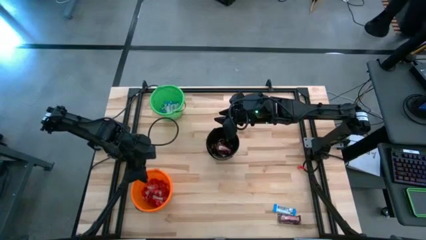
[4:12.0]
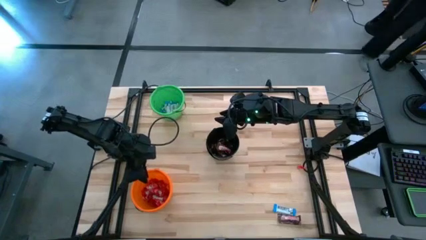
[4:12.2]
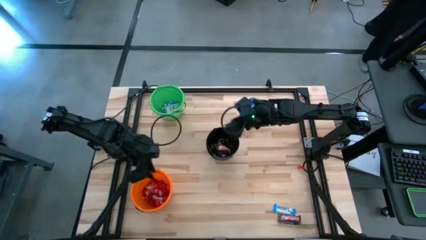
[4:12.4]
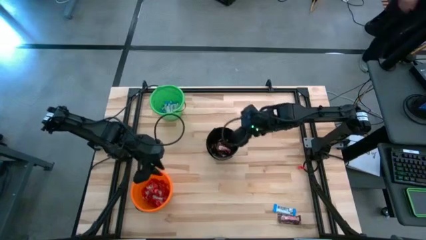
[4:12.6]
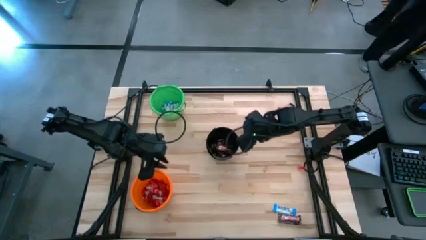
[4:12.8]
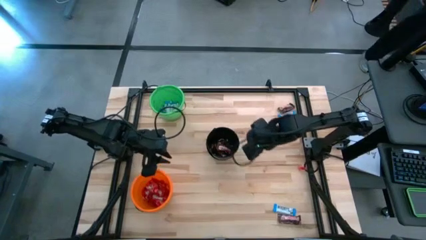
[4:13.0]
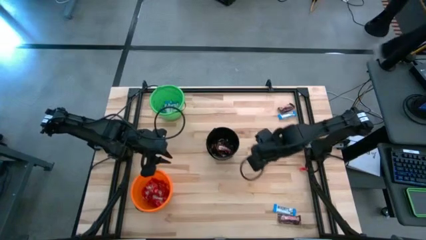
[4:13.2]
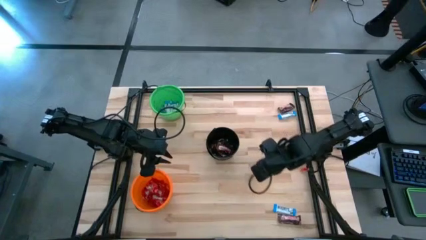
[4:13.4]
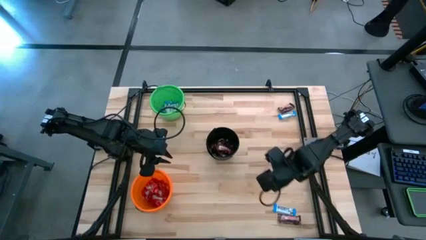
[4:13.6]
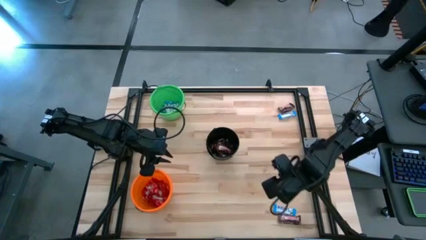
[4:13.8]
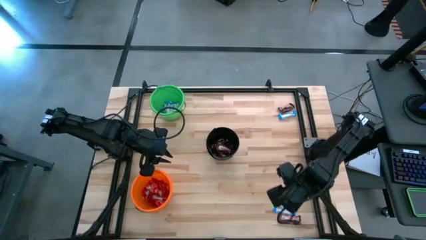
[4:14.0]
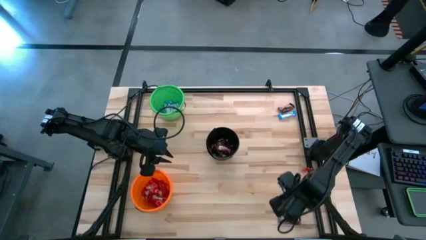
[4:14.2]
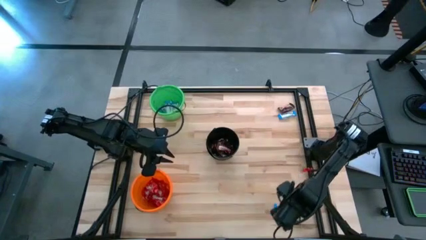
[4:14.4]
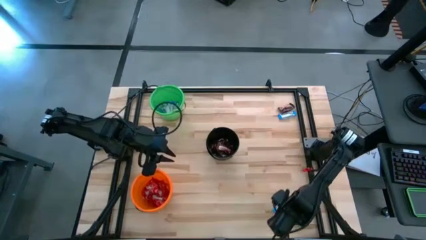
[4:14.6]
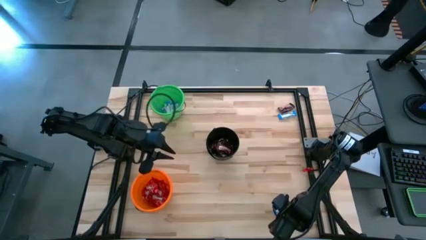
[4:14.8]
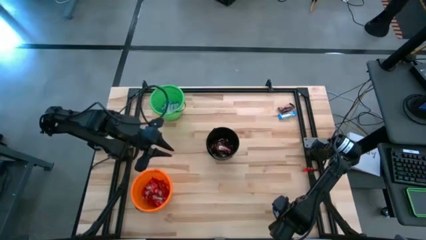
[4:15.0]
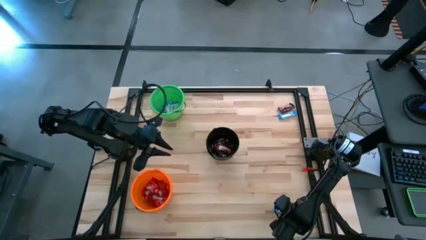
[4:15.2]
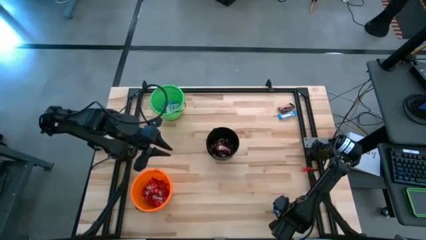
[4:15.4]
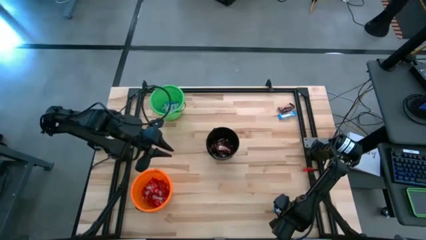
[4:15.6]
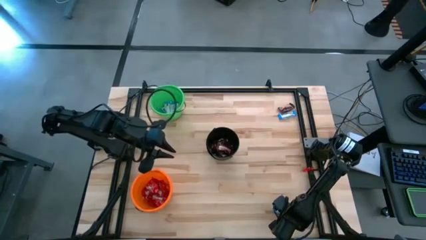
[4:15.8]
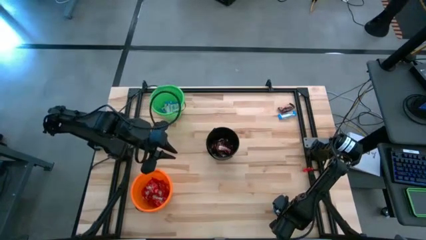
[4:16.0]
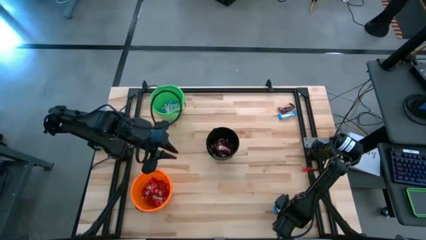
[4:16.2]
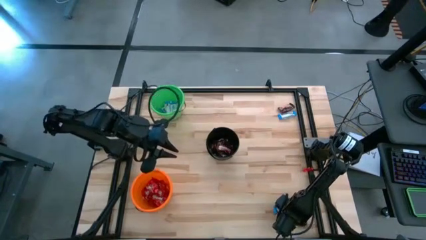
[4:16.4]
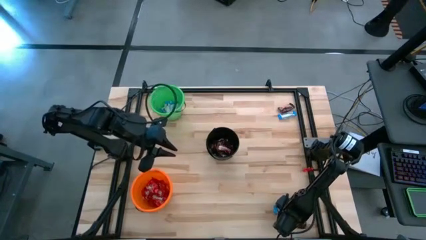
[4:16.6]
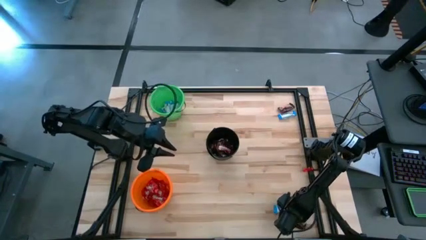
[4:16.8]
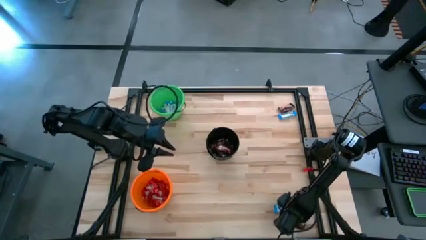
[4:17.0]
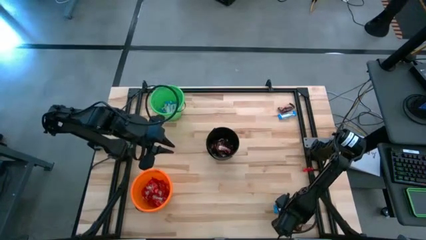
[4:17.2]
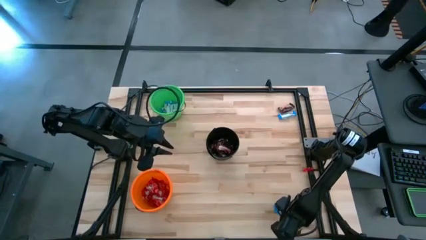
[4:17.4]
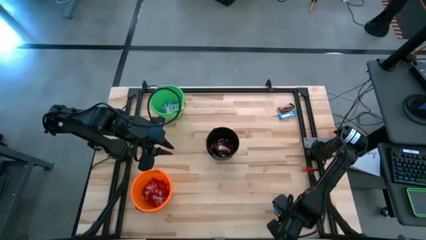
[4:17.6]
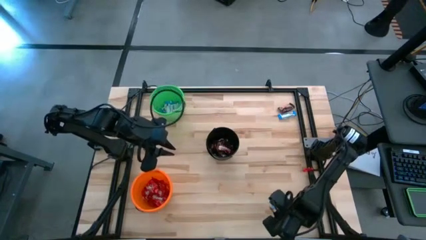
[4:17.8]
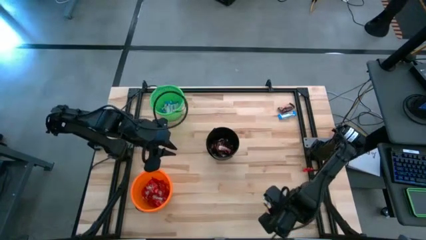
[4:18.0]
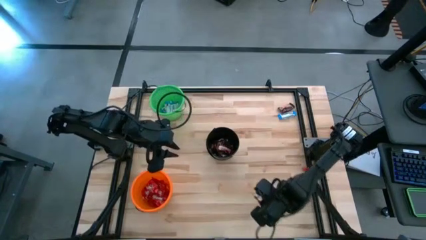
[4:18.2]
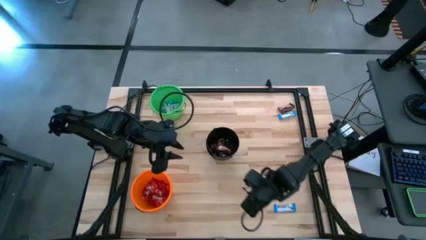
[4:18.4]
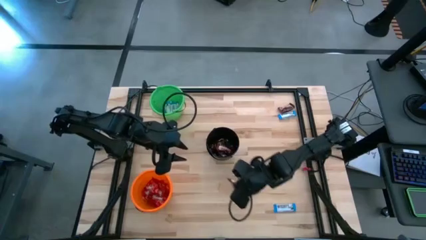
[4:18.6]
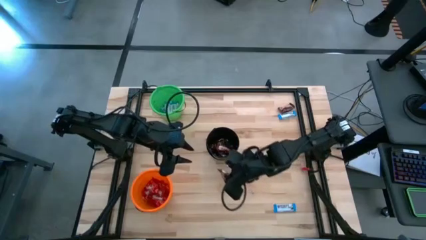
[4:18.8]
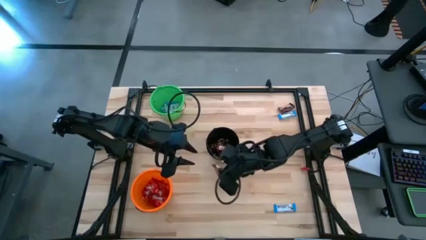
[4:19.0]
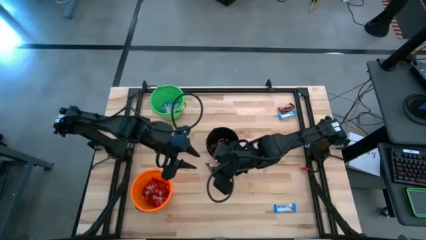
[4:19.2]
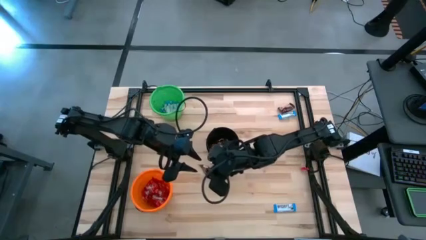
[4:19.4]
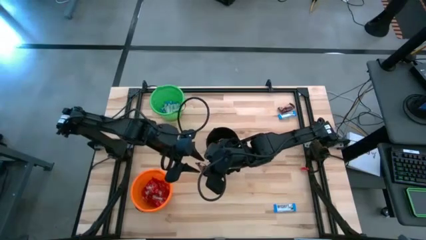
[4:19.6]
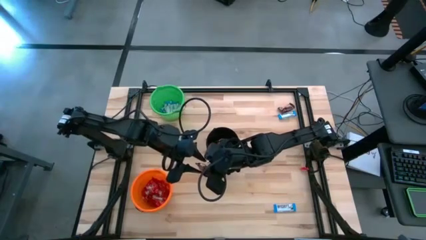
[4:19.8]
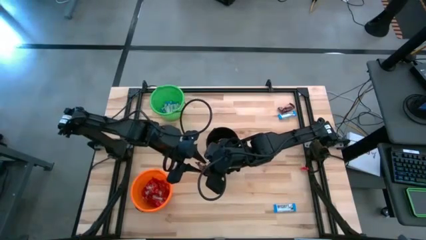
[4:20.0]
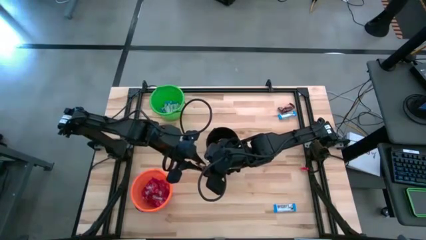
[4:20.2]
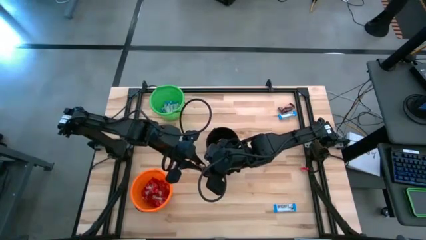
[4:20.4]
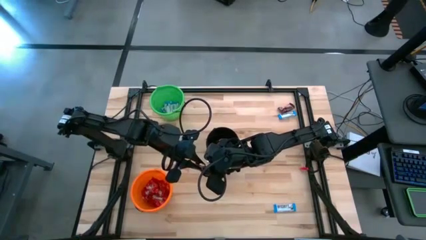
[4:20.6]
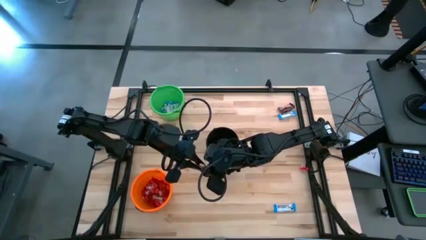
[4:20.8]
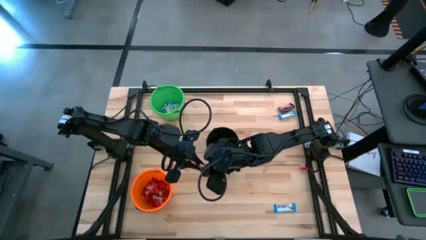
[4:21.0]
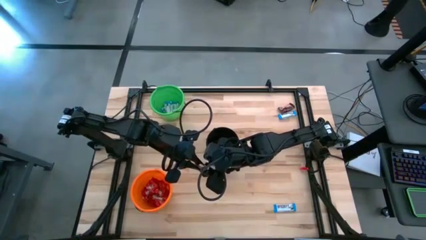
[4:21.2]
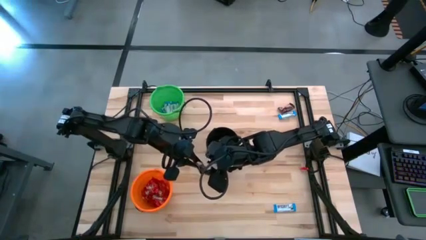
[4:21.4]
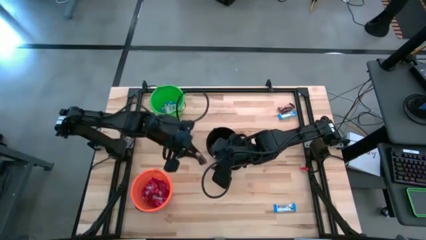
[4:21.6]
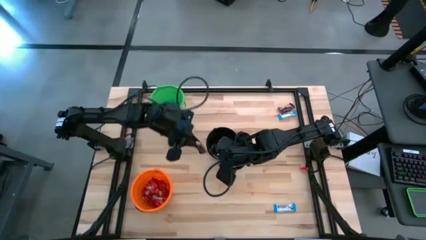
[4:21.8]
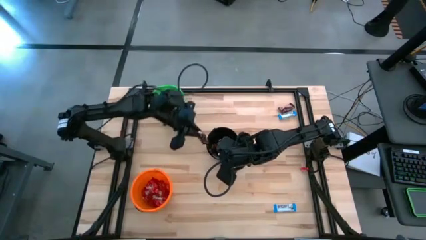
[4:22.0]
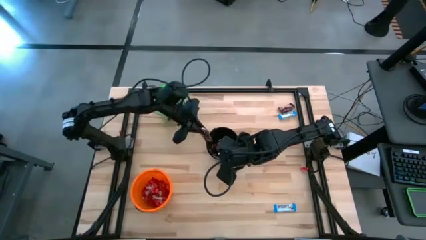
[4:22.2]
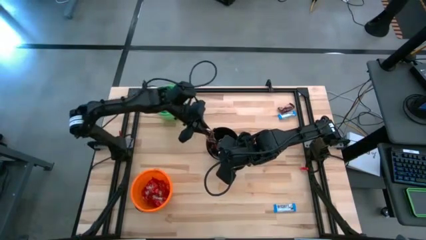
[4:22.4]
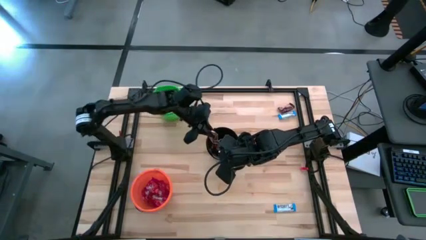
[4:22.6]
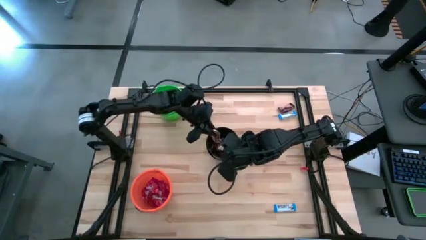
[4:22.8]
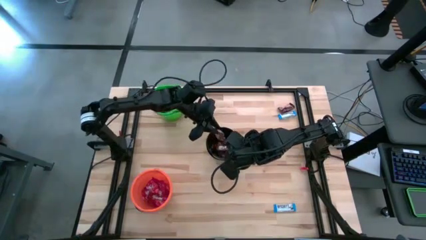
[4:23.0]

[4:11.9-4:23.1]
Task: Sort candy
Put the bottom brown chocolate into the black bucket

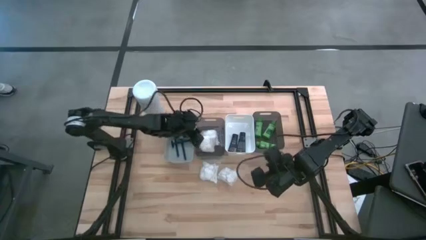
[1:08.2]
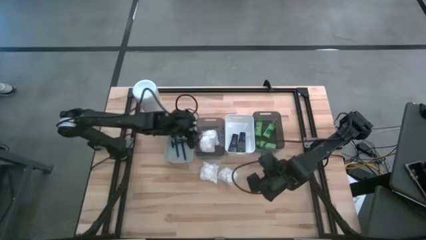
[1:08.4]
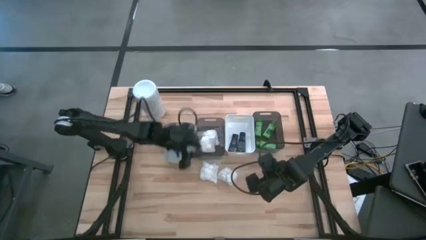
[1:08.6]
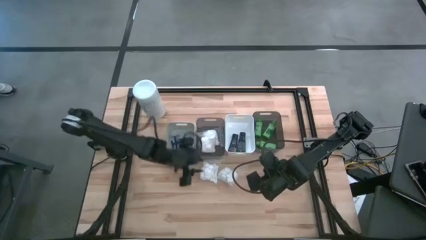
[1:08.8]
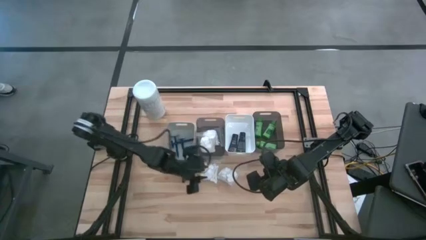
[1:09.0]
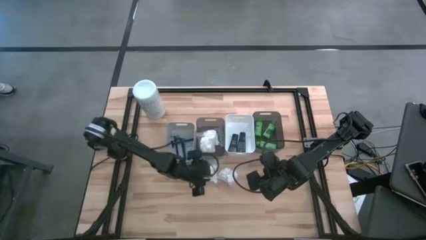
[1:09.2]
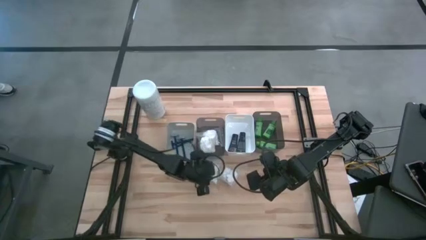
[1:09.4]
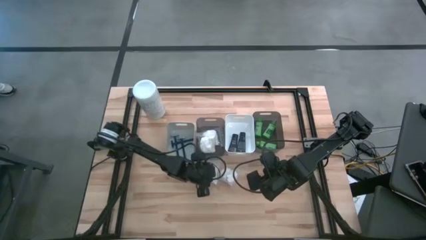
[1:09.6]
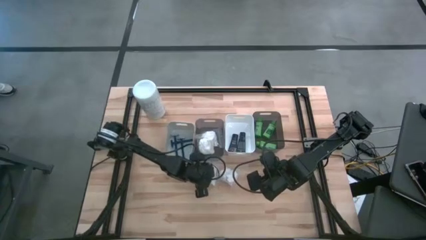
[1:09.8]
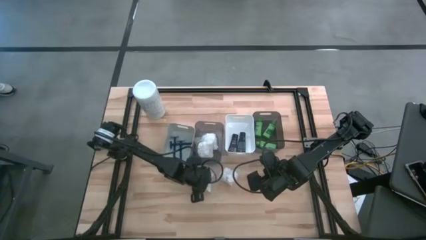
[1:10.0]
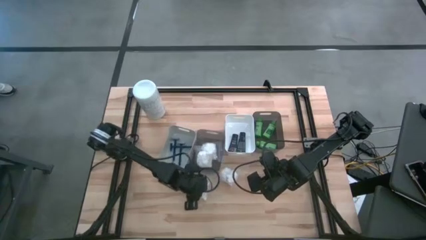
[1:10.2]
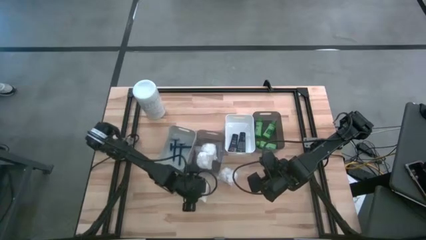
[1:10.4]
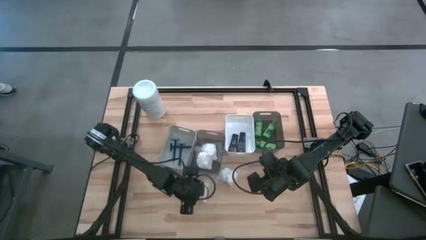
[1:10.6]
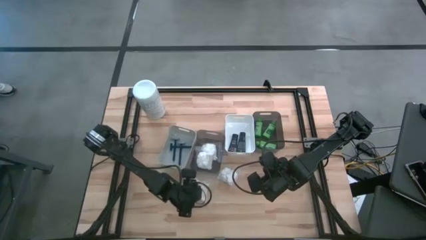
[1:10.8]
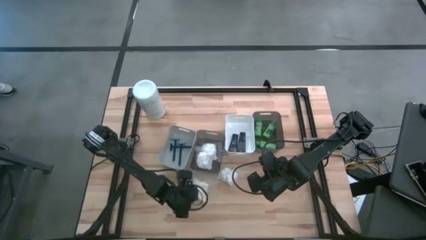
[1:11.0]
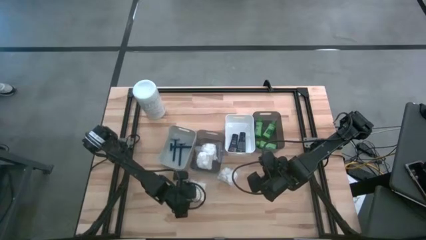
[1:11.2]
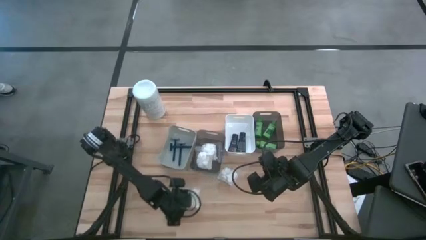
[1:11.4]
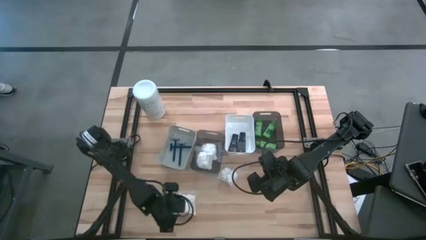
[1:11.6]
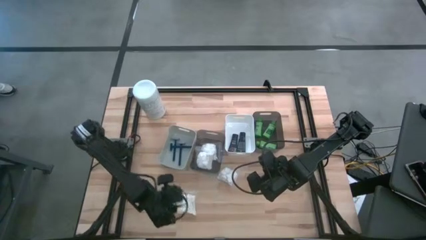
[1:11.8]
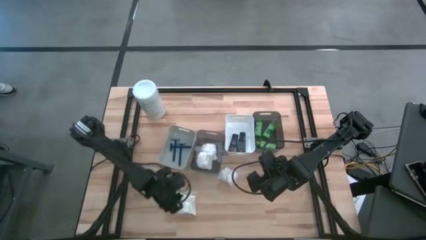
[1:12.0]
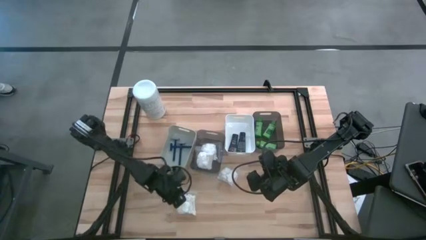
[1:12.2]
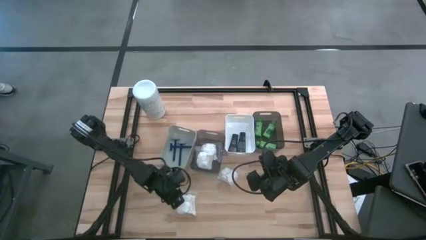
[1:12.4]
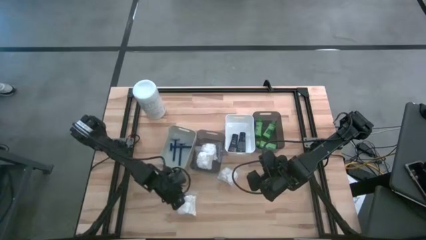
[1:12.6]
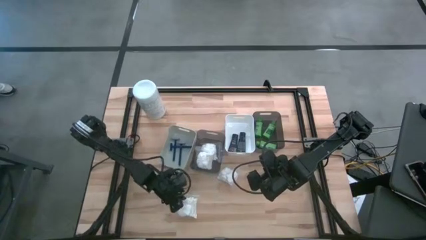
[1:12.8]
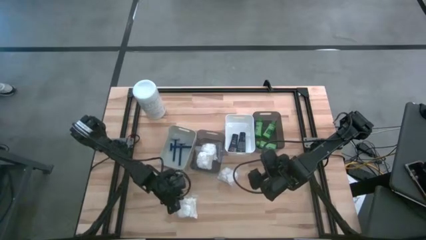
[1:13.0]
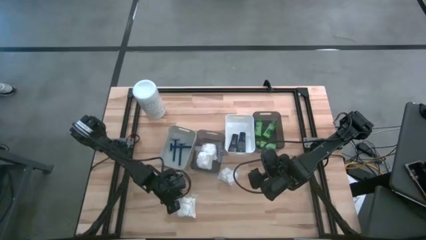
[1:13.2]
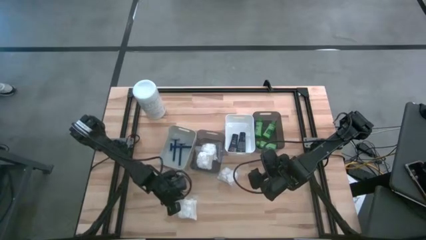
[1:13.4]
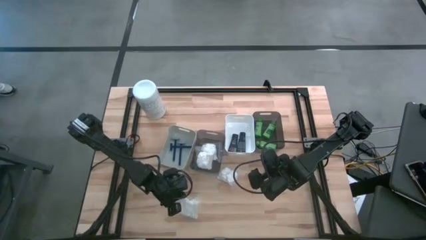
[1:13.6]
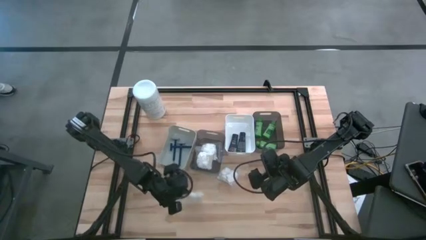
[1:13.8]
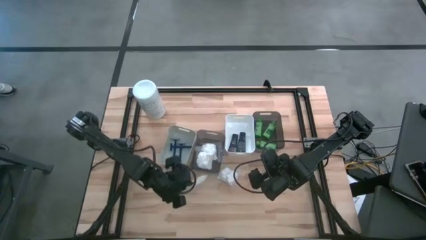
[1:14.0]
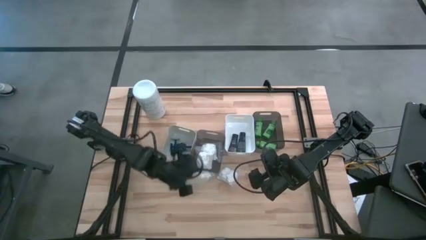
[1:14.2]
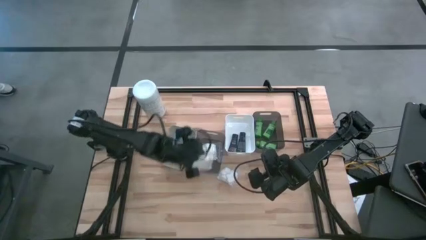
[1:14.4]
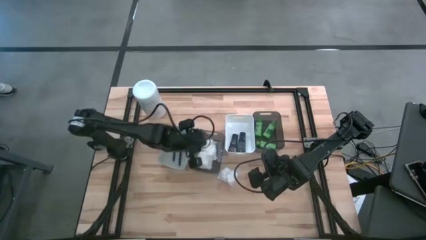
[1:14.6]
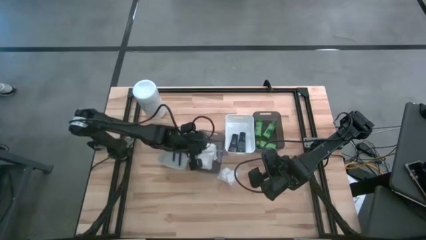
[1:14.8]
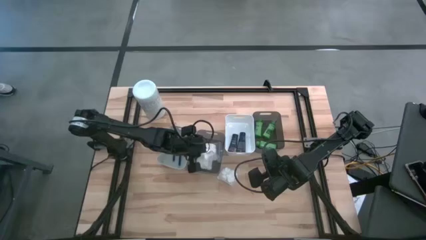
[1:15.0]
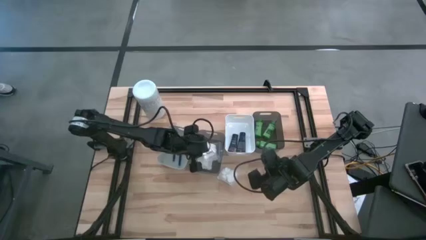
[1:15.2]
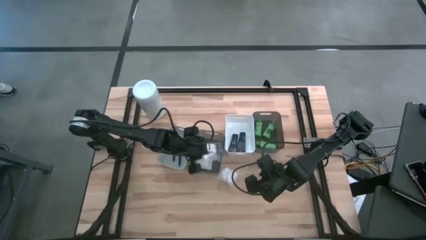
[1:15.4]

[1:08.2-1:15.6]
Task: Pick & Place Travel size toiletries
Put the left cotton pack into the left black bin
